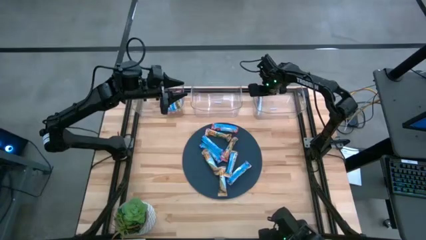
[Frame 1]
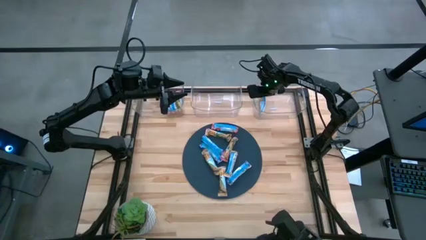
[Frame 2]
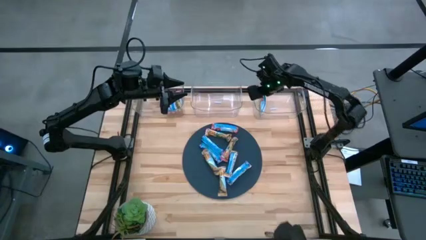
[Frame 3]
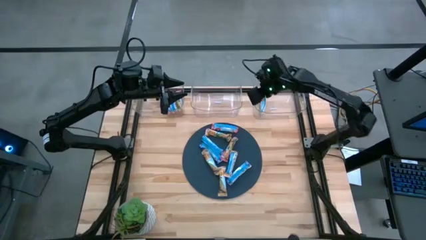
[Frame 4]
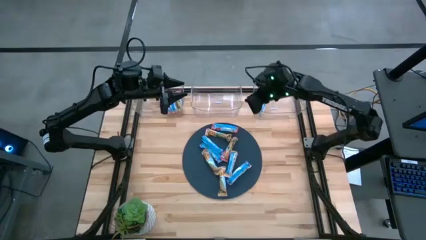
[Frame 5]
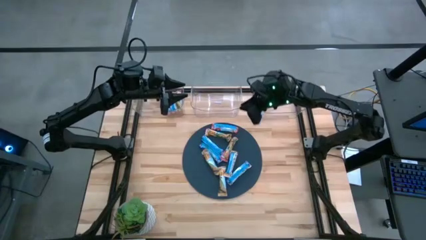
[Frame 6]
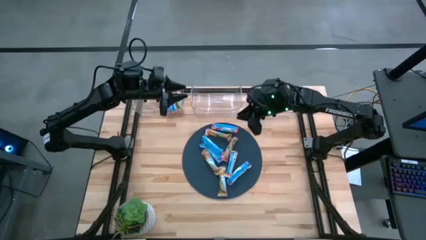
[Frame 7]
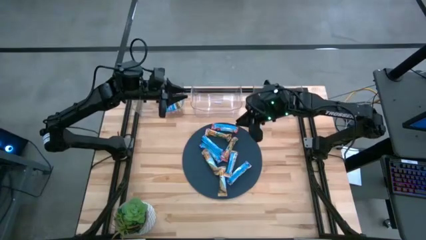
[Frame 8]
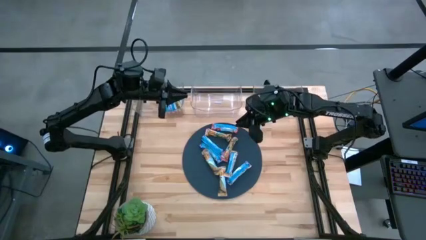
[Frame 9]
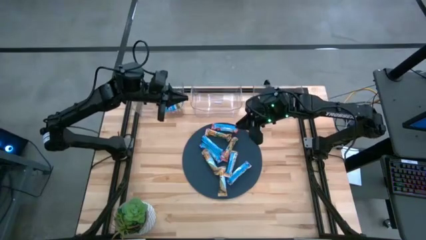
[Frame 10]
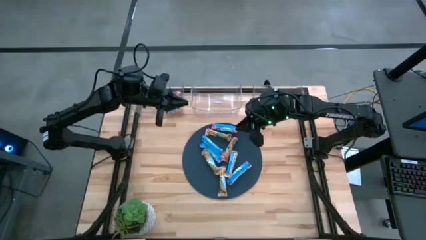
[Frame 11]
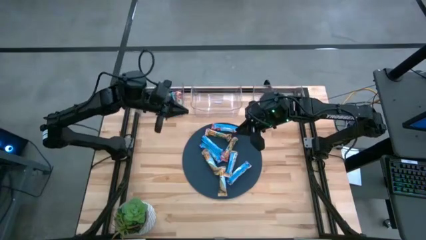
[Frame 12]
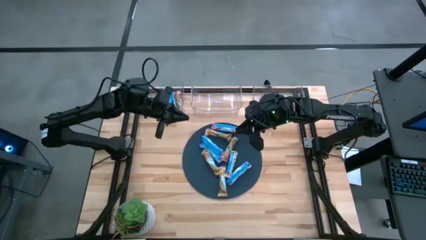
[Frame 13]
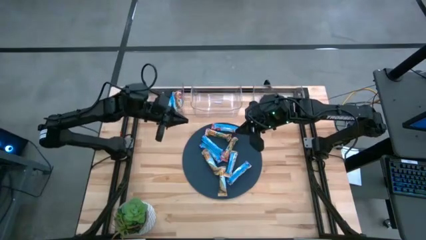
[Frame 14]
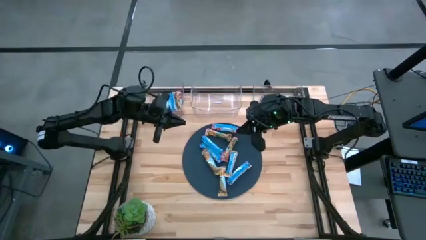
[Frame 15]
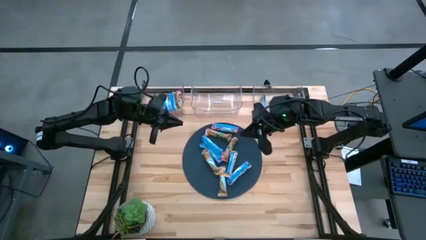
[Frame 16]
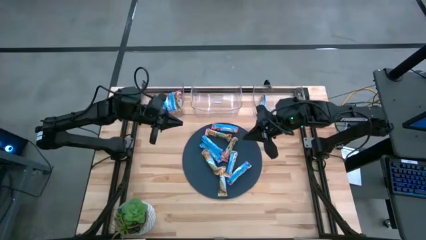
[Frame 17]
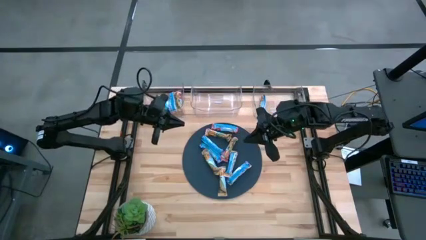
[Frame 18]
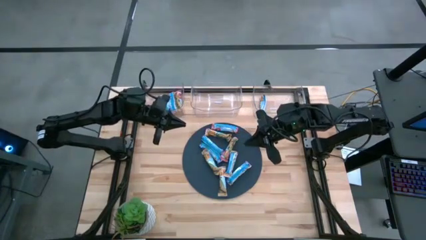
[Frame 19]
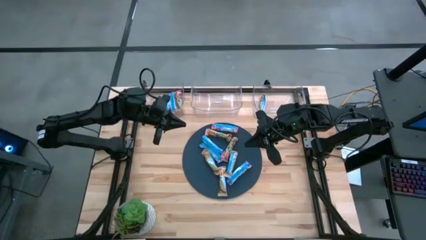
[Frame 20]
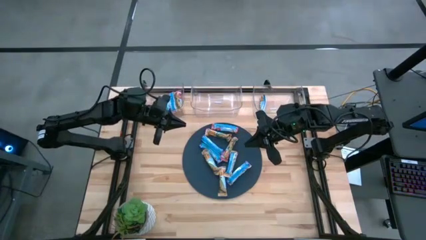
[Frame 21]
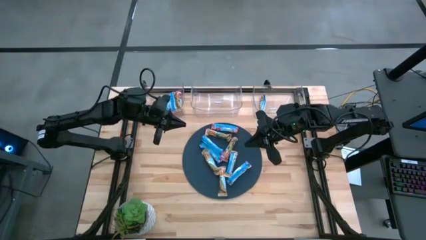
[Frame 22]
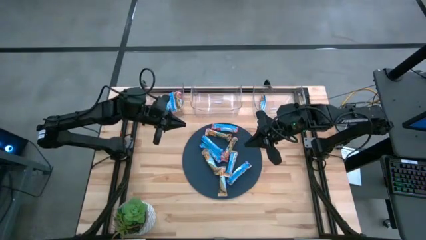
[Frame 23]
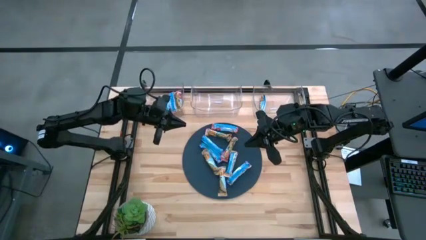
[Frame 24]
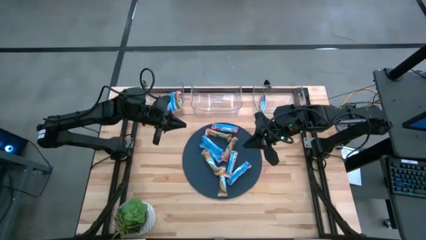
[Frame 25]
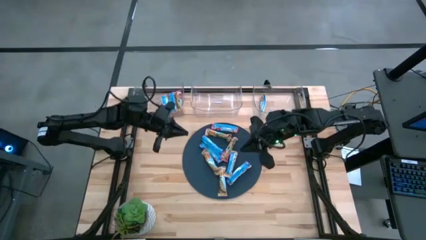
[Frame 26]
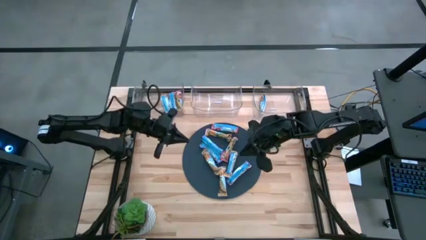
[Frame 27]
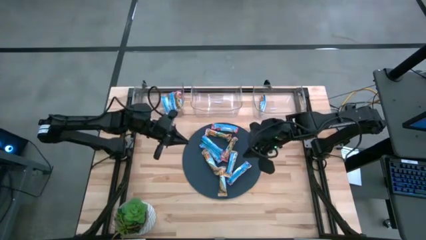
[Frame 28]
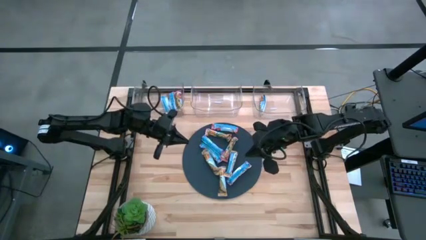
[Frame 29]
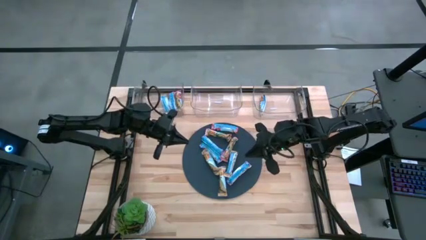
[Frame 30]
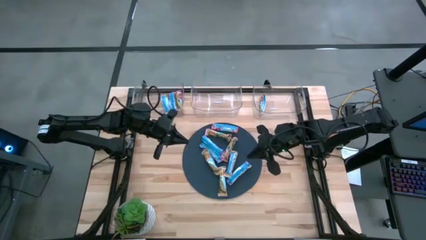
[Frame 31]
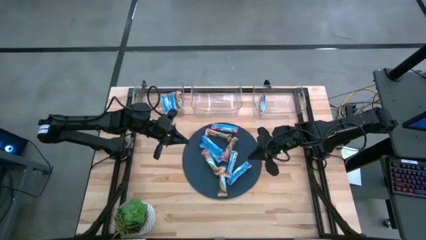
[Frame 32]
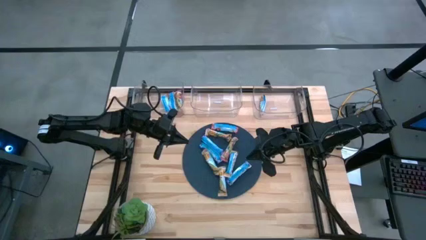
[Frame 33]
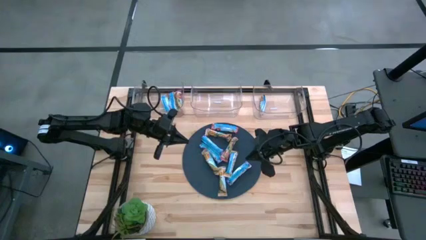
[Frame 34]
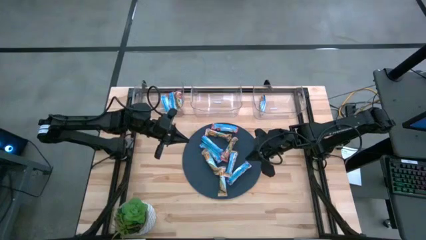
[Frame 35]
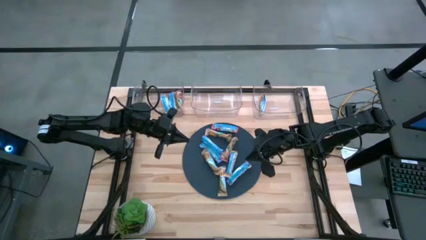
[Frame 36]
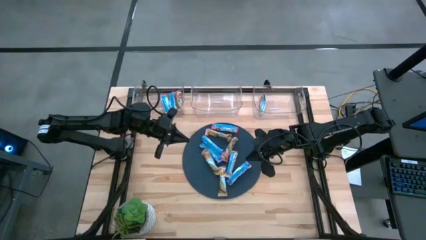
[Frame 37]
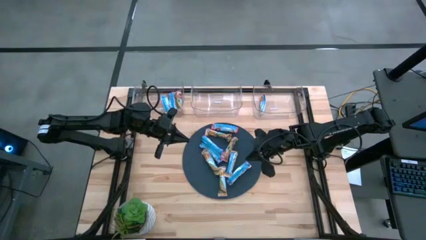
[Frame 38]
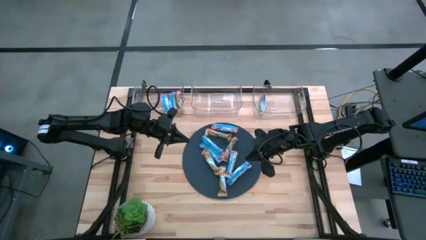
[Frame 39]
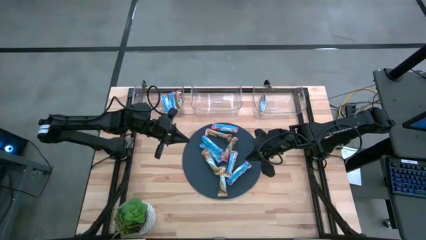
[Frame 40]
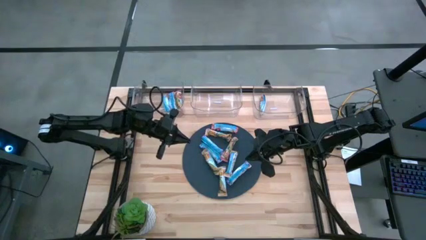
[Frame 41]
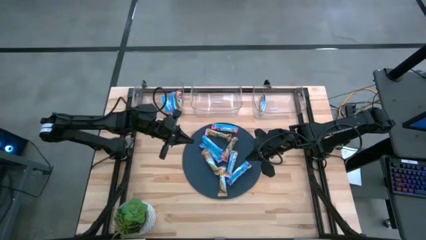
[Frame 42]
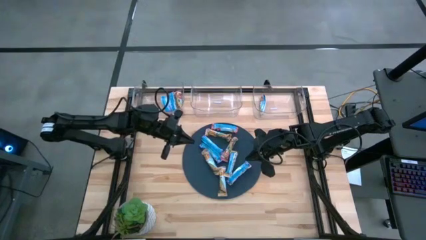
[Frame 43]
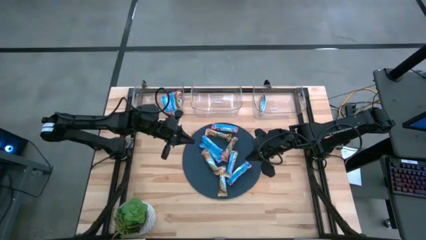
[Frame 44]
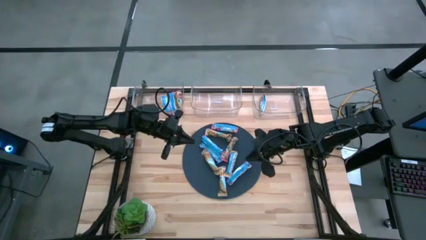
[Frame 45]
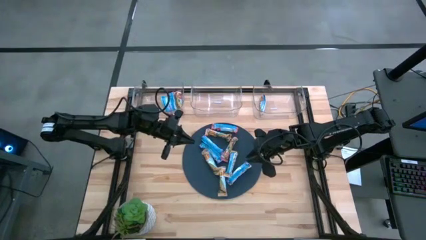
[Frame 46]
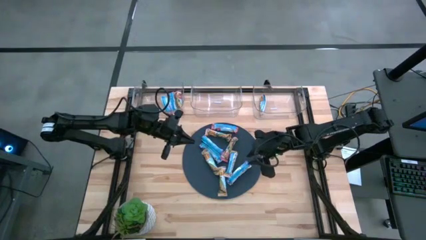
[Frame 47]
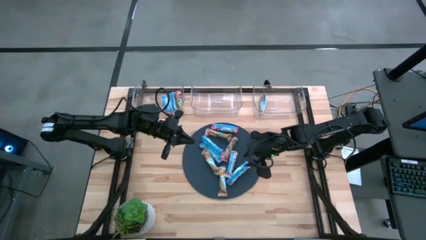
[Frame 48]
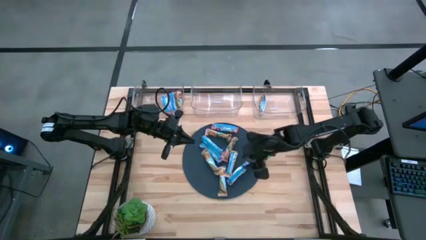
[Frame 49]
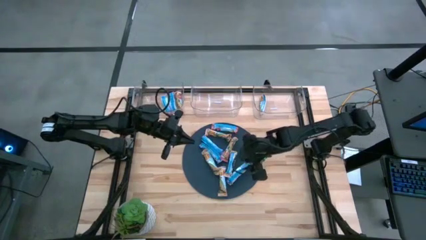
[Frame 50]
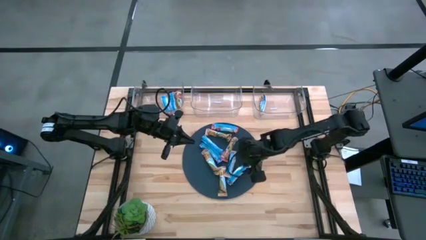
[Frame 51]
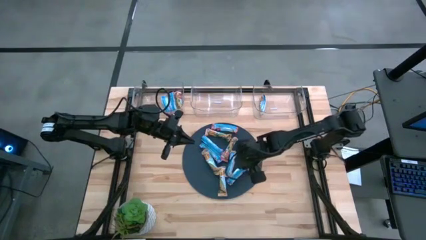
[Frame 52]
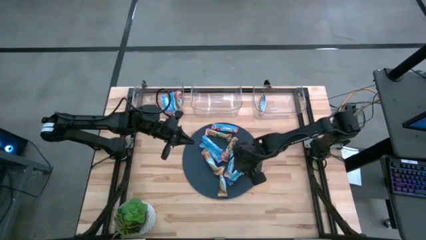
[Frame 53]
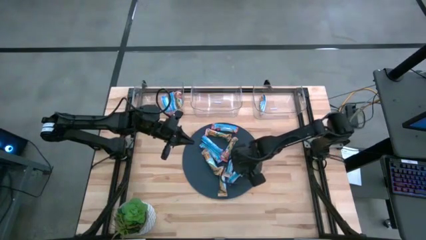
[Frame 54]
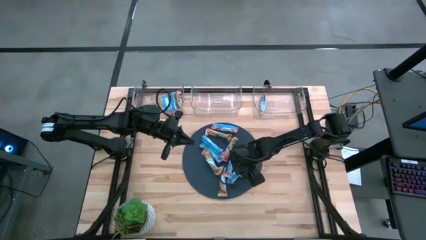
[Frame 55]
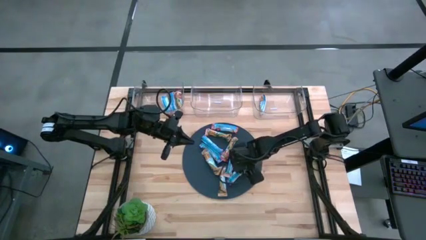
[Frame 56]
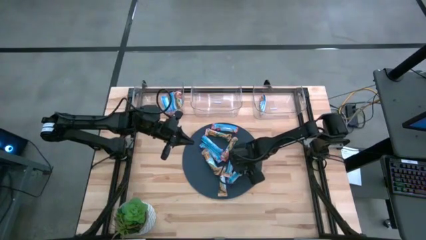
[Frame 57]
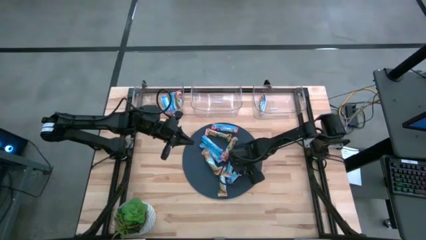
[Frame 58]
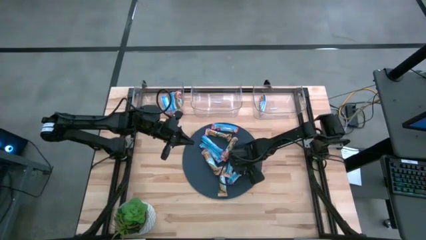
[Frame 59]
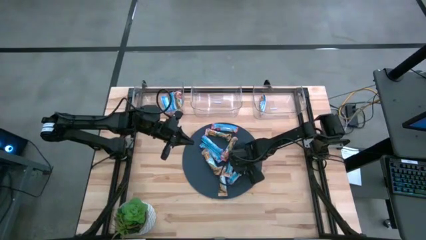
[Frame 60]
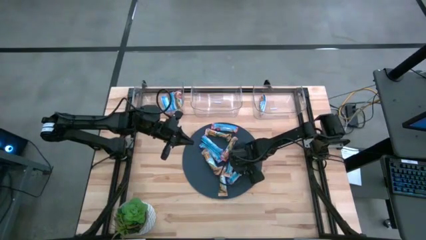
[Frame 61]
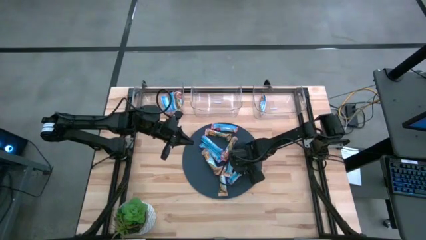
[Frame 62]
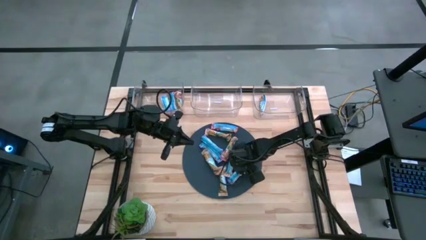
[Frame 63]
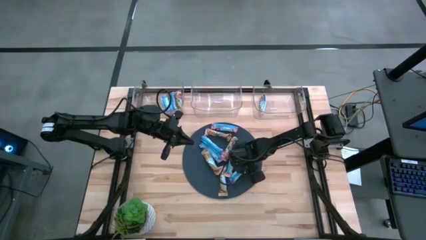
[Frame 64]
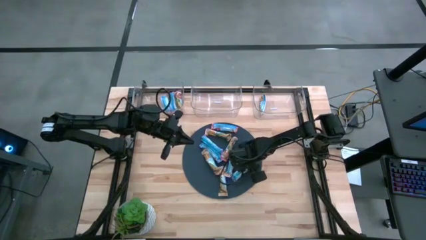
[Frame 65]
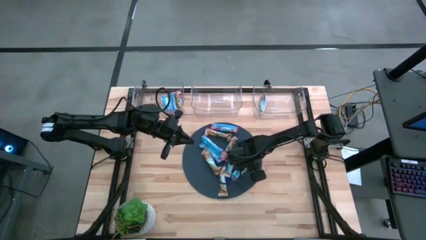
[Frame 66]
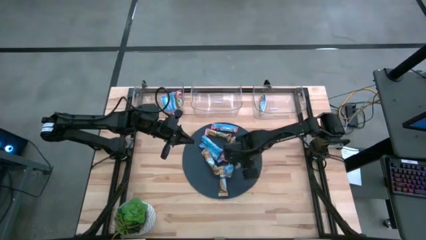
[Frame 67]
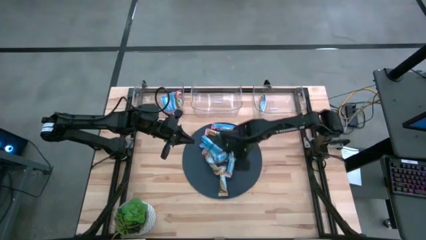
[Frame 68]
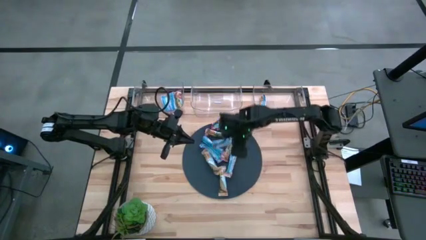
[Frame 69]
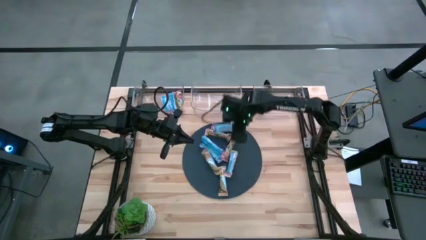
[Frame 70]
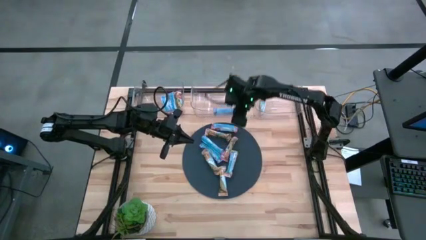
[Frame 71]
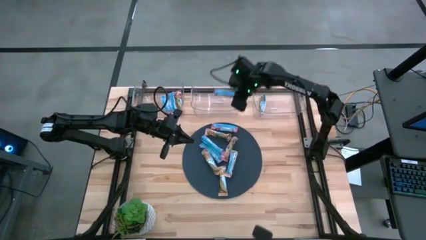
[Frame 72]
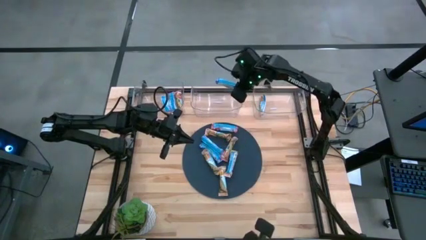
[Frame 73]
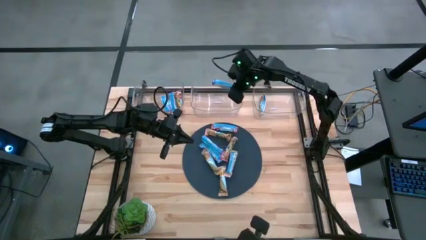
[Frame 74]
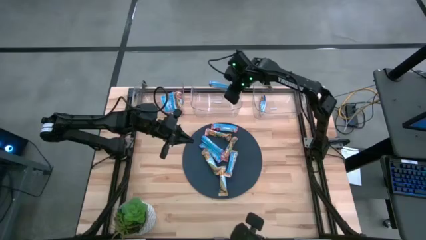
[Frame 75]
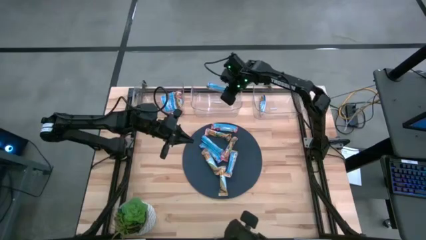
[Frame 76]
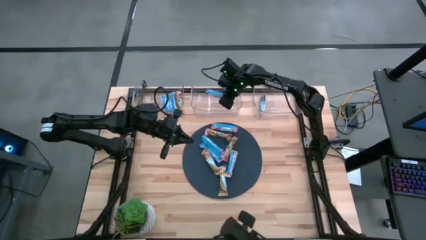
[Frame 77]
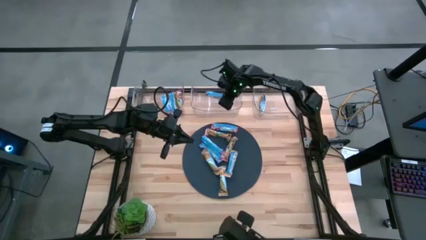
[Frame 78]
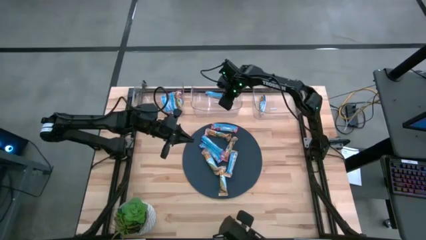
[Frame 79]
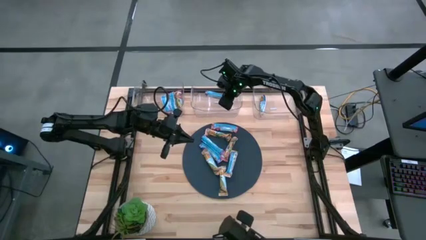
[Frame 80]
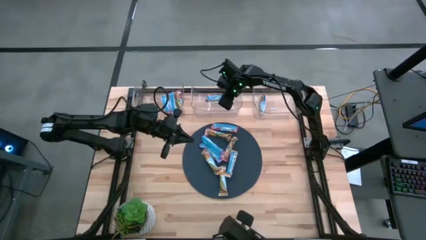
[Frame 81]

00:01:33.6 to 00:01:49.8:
Task: Pick and place Granola Bars by type
Put the blue granola bar into the middle transparent bin
